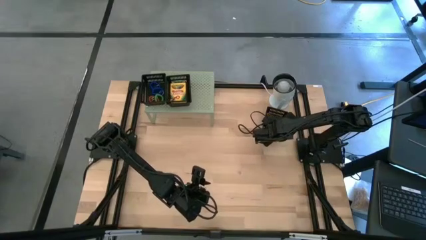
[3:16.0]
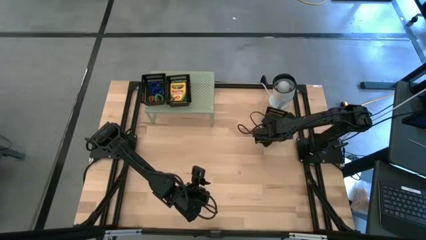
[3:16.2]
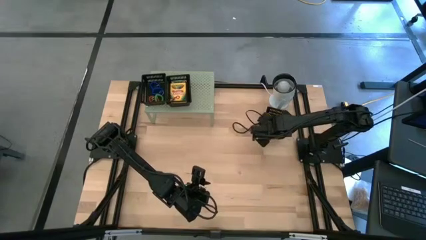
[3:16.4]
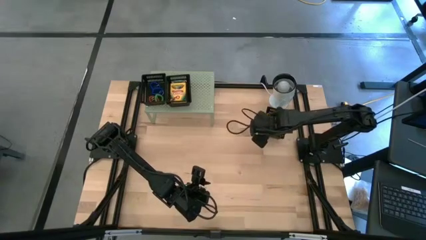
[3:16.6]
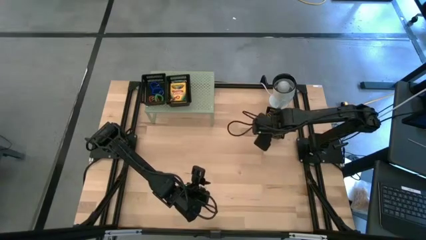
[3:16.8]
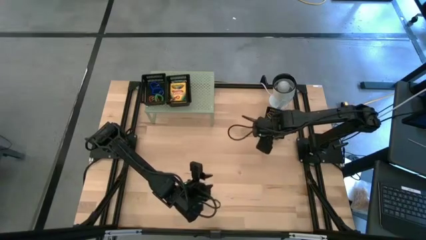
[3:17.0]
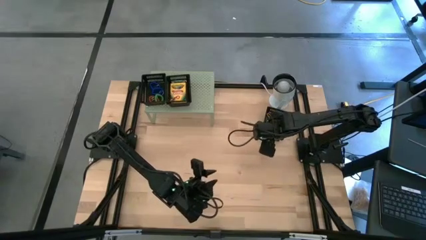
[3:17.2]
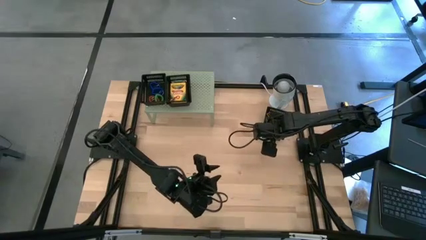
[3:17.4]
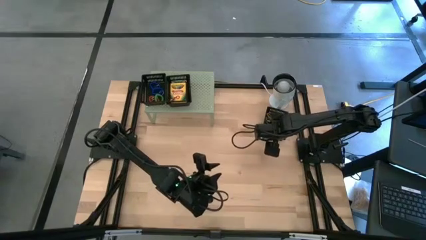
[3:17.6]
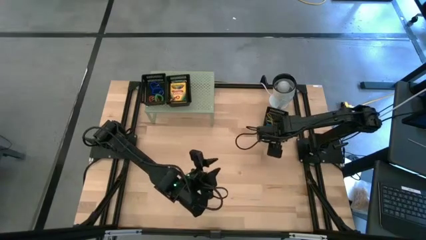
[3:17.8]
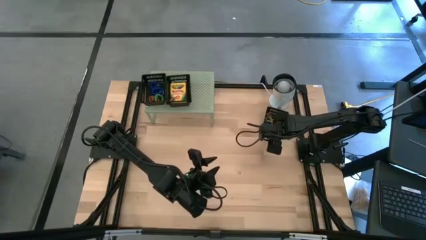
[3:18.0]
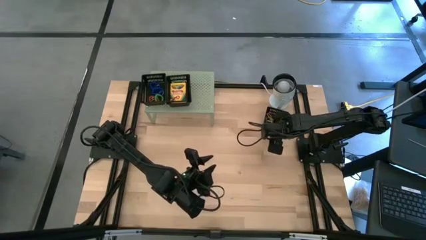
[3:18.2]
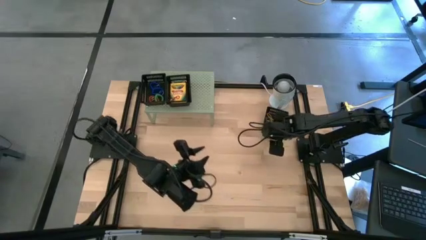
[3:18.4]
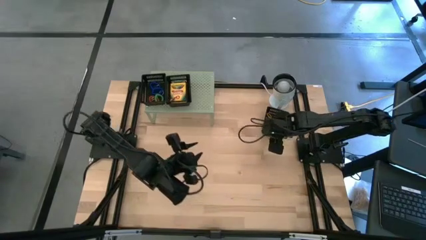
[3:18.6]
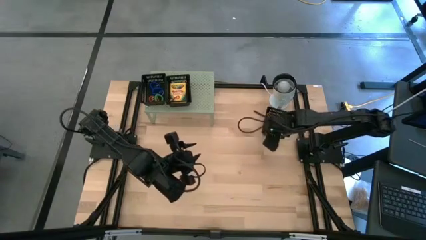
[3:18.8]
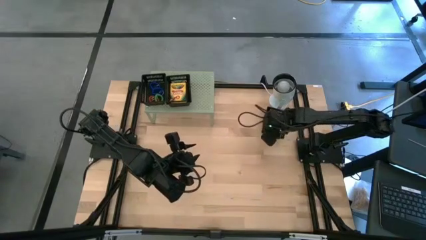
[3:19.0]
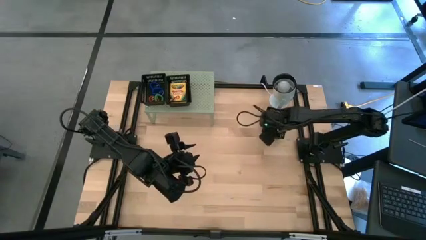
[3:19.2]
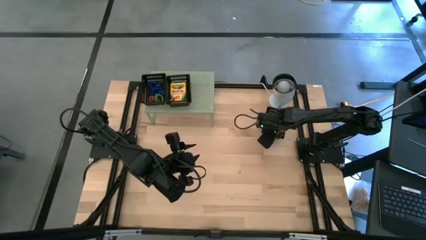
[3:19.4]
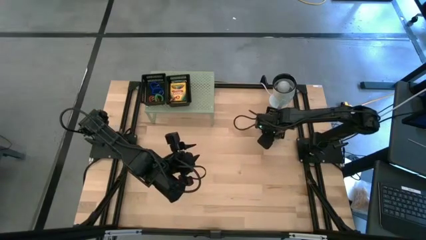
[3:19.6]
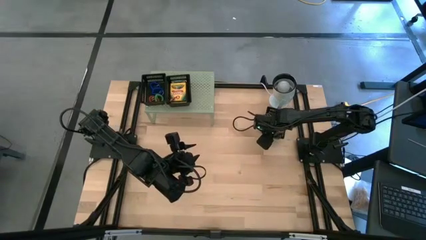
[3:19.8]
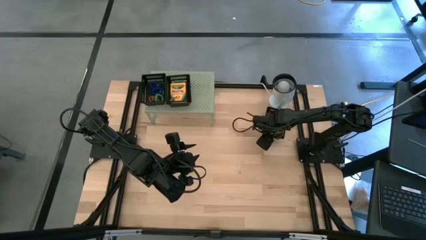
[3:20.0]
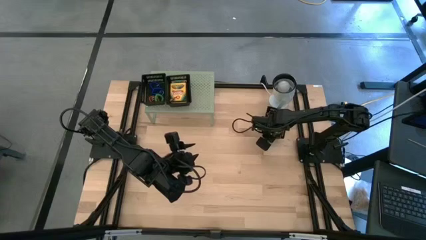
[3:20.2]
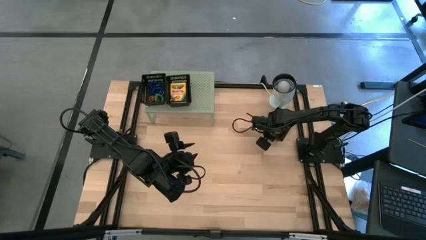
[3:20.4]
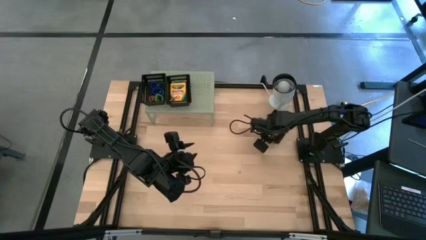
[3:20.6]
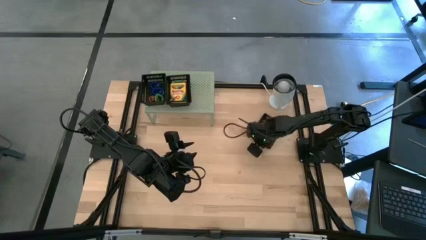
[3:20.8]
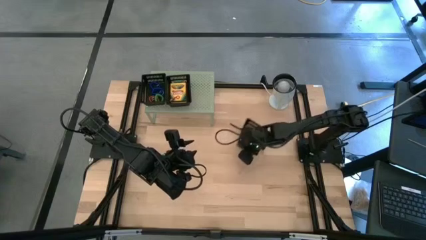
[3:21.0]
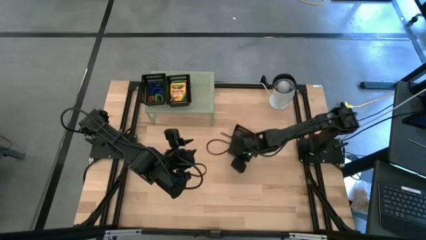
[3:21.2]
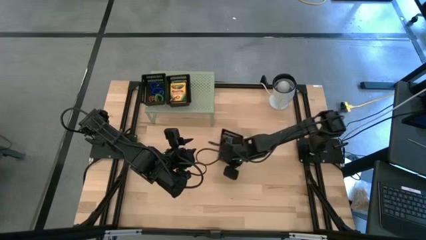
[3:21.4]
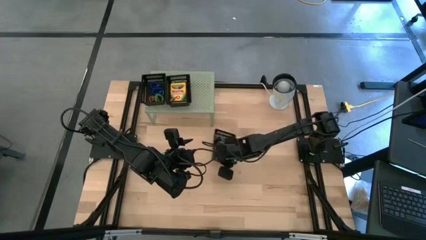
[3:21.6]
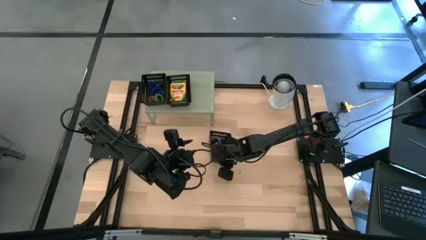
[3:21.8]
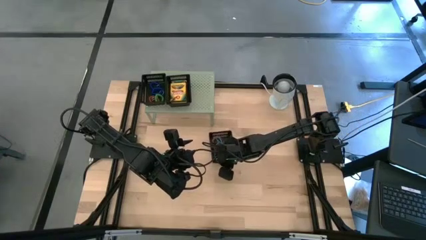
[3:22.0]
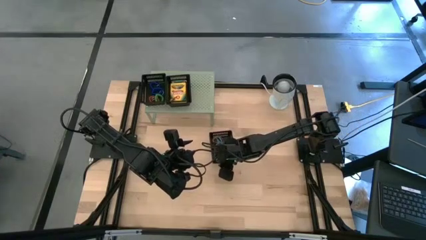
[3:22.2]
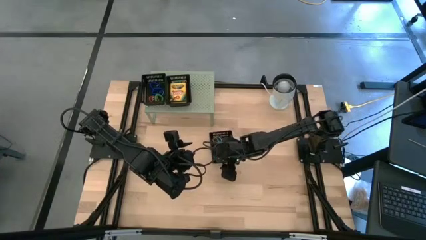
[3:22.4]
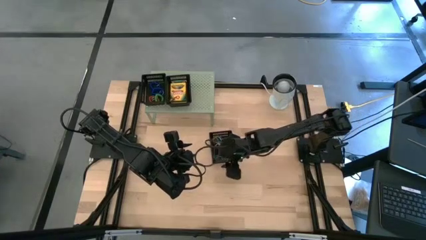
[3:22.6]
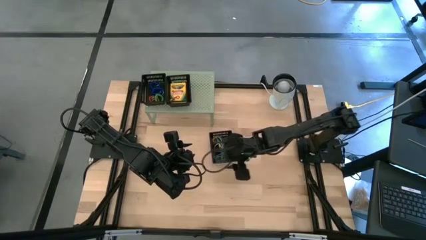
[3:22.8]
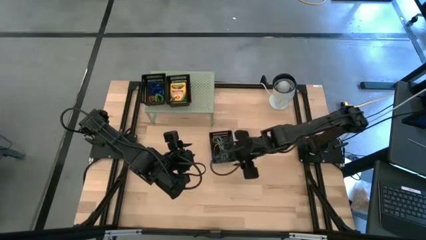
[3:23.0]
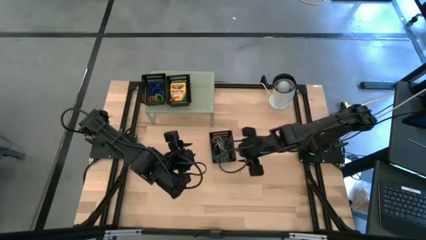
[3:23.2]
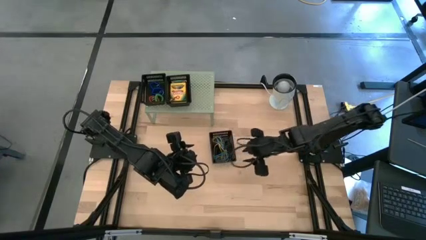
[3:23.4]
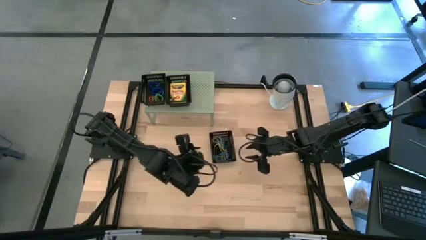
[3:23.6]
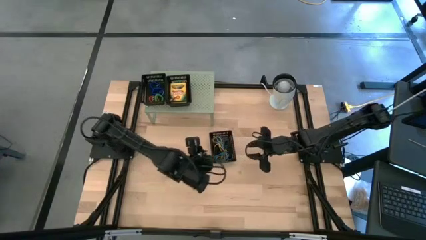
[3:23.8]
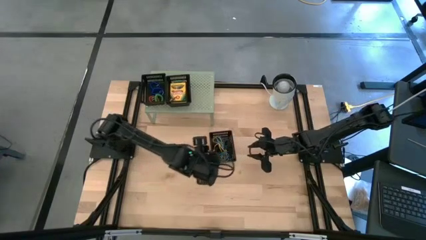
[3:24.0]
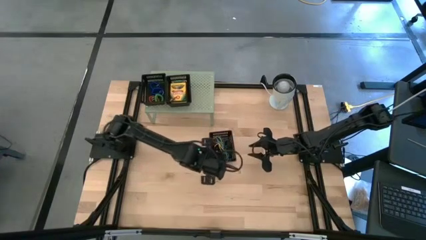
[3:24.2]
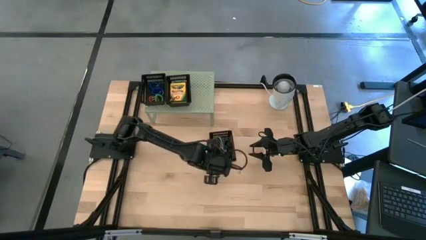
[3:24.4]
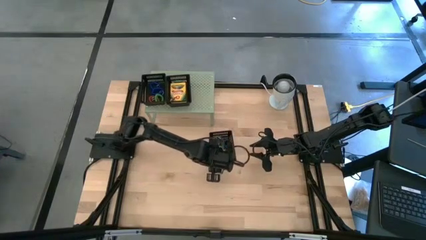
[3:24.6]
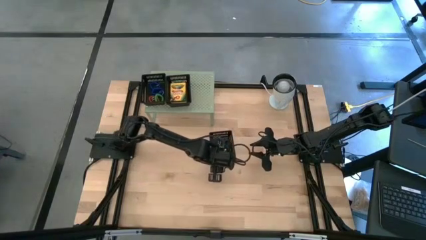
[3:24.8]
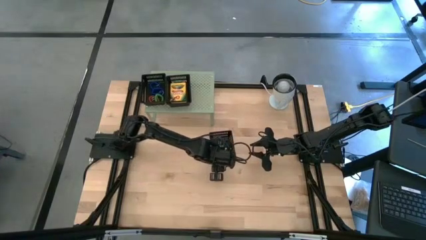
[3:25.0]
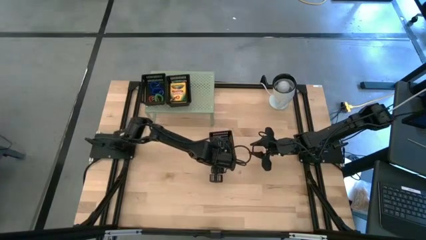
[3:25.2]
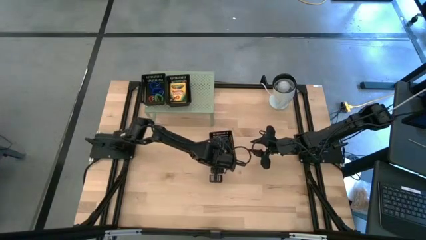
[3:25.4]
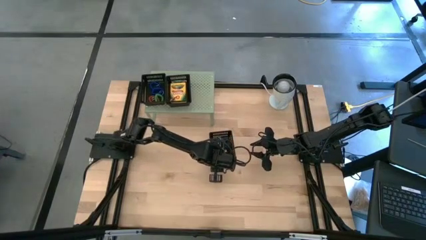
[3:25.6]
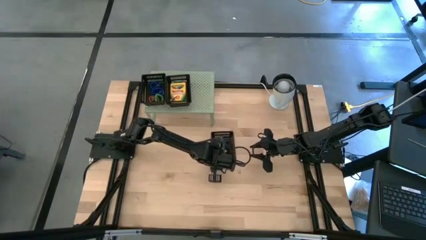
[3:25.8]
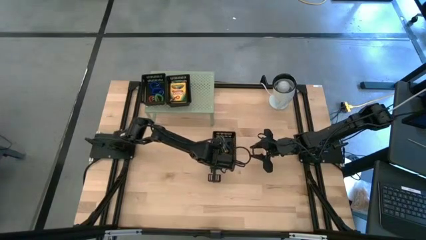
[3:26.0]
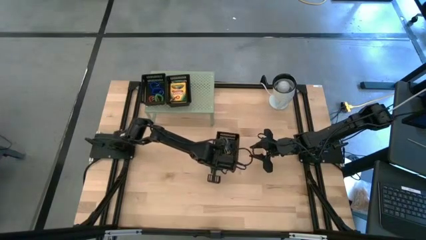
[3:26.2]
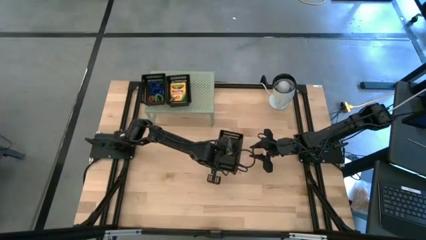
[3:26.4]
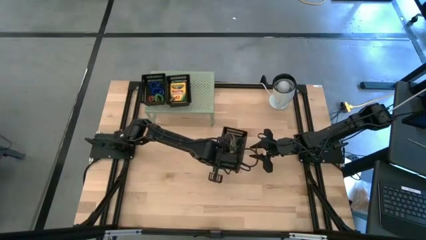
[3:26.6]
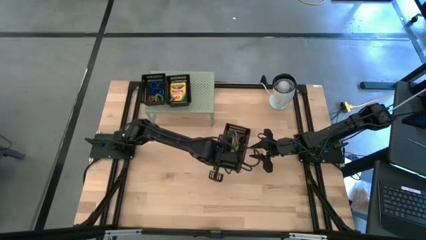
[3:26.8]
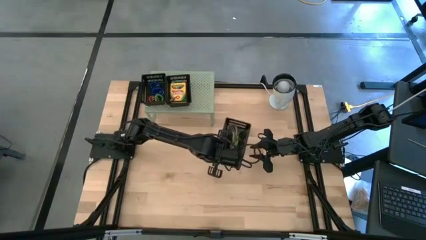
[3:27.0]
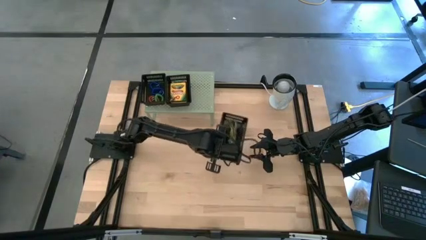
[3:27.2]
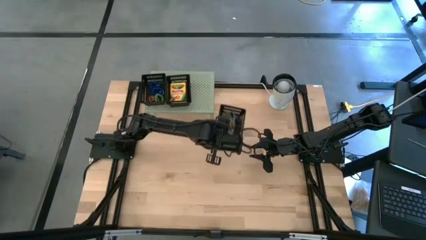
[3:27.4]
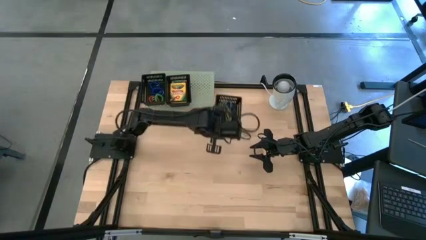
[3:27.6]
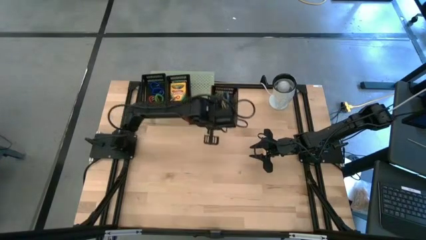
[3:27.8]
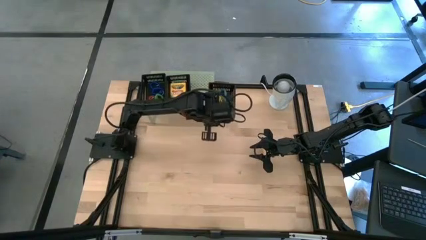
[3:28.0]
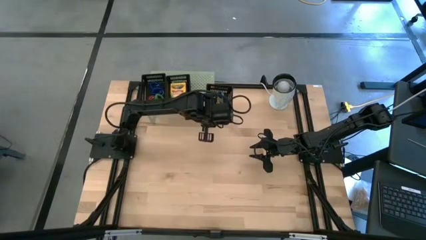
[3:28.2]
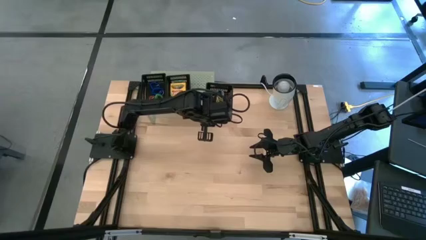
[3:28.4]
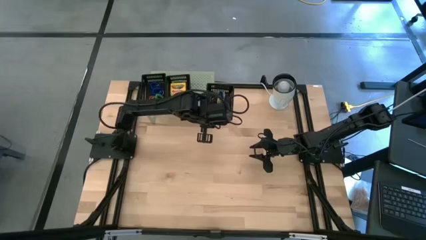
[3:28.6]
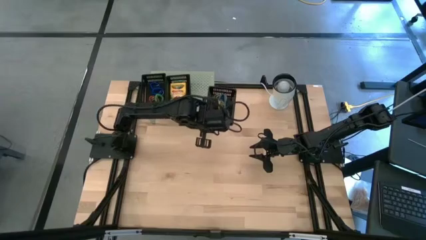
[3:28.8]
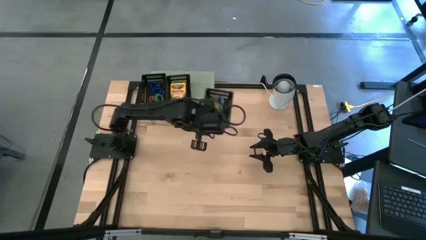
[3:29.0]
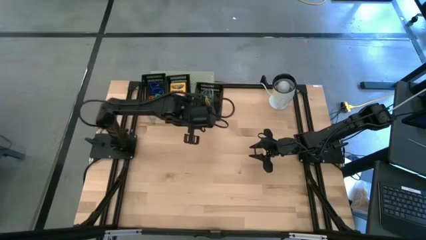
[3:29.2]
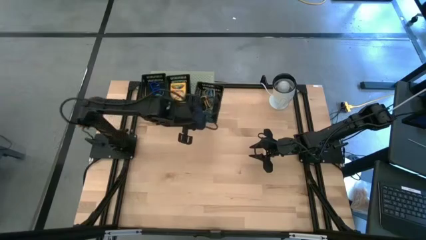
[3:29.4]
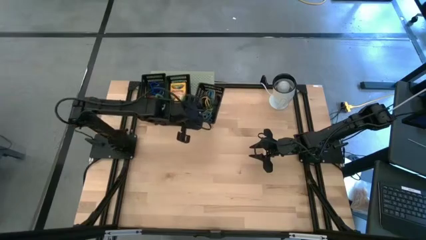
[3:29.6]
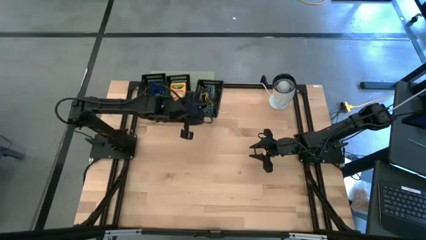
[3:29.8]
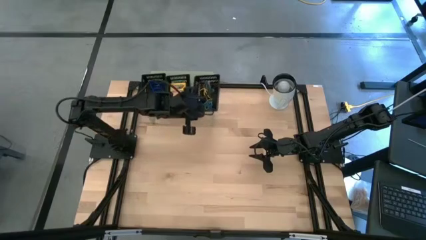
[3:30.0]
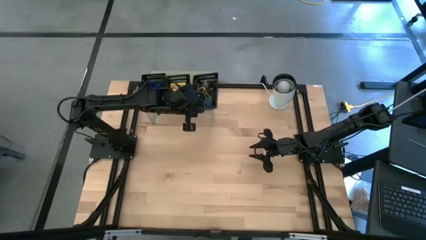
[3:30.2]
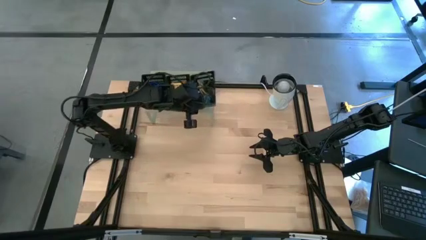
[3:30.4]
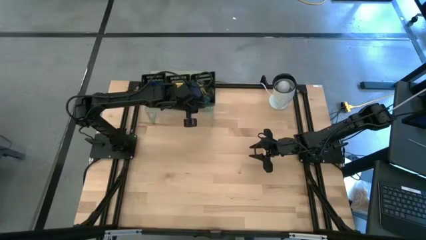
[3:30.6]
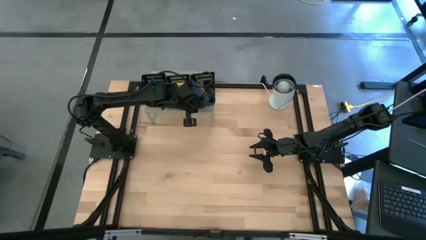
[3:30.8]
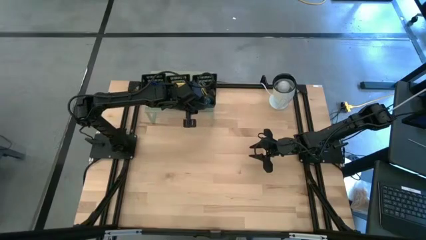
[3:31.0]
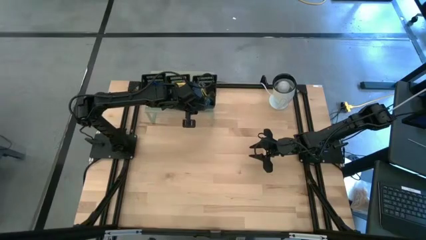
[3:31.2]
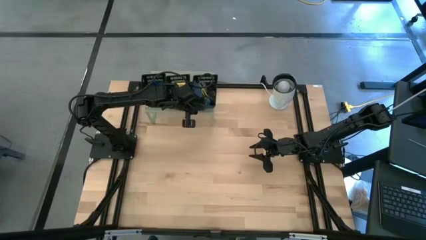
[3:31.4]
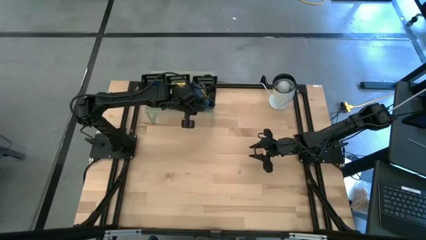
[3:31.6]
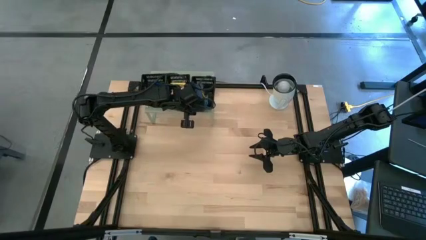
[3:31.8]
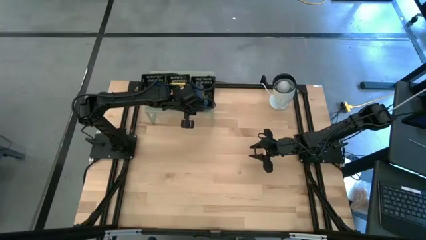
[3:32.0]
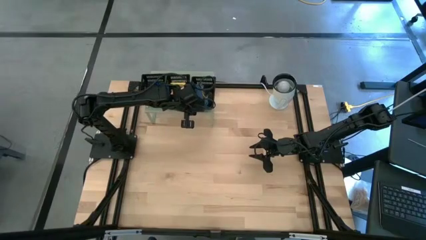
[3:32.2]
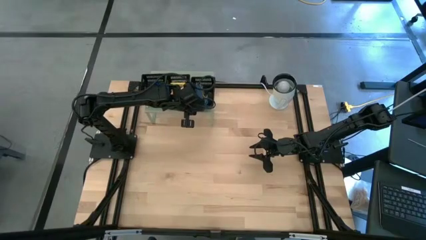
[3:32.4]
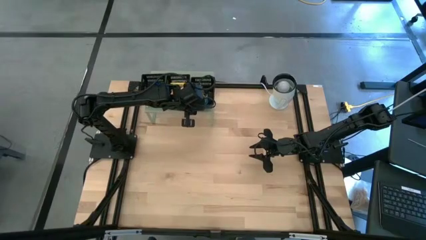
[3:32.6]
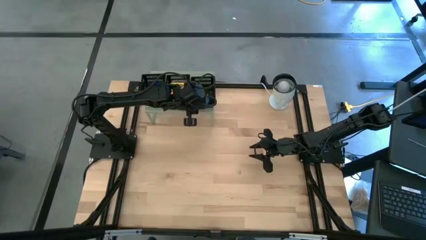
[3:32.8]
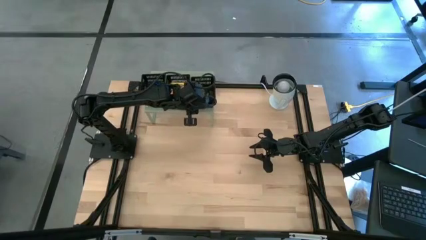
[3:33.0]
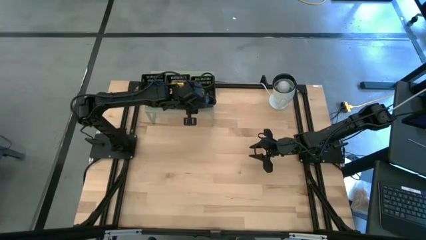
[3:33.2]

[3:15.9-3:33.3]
Task: Pick & Place Office Desk Supplies
Put the black bin on the shelf
